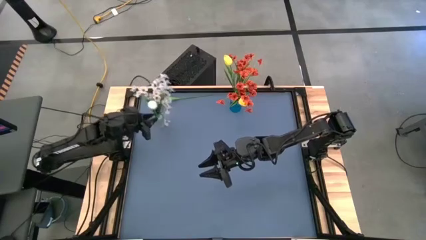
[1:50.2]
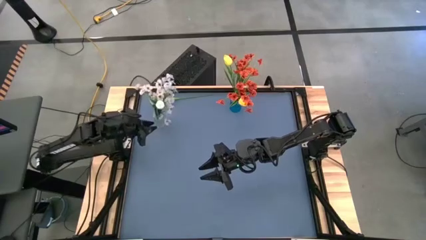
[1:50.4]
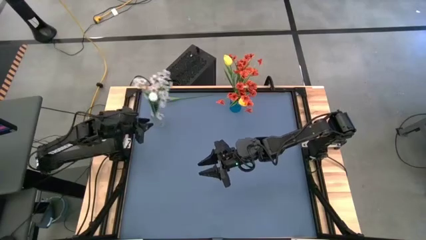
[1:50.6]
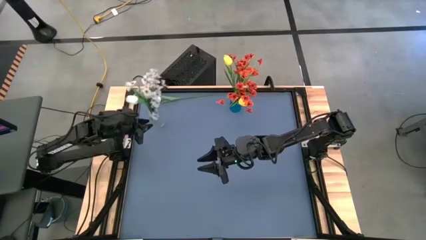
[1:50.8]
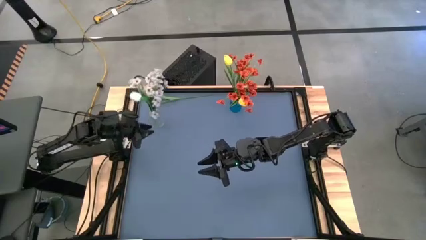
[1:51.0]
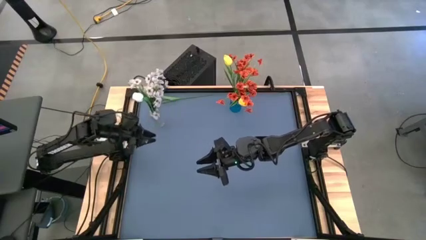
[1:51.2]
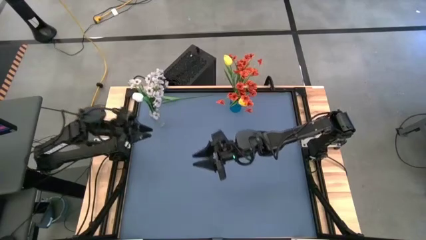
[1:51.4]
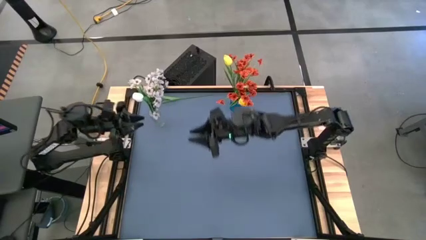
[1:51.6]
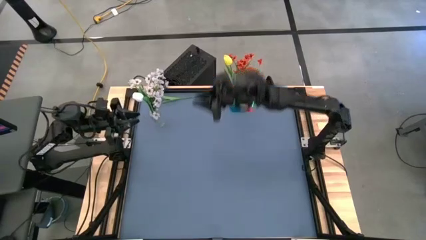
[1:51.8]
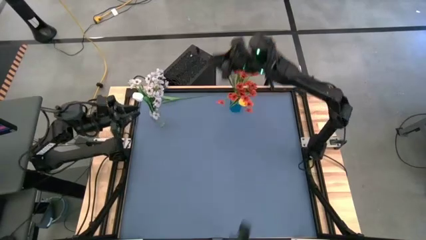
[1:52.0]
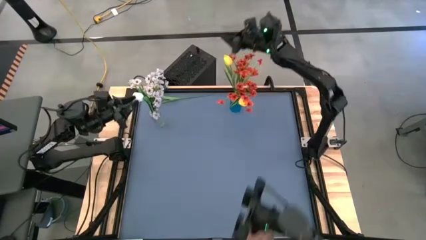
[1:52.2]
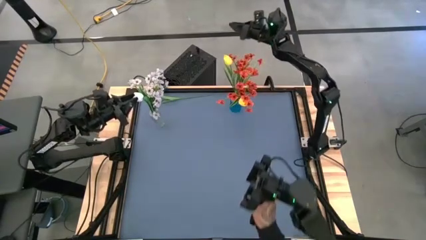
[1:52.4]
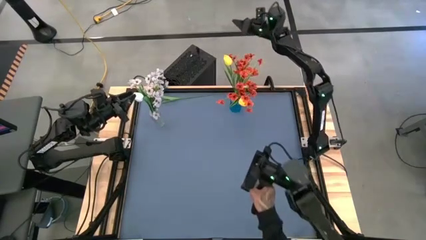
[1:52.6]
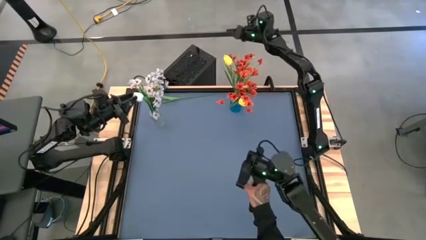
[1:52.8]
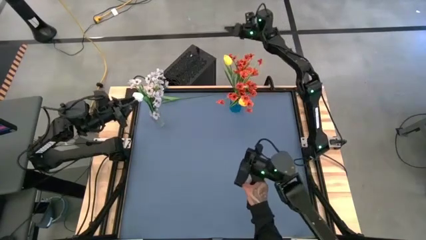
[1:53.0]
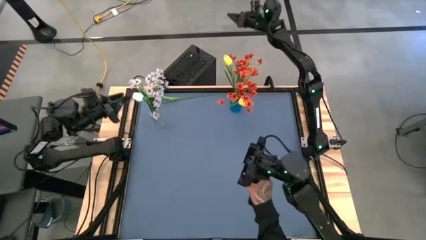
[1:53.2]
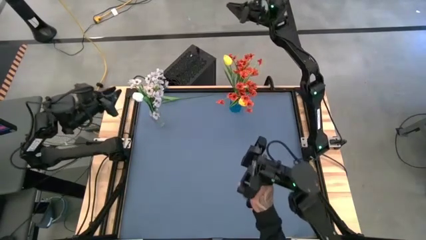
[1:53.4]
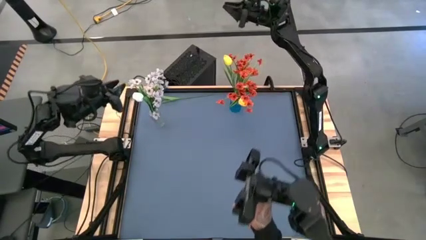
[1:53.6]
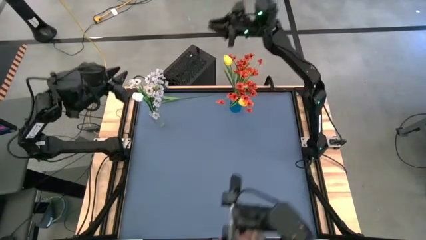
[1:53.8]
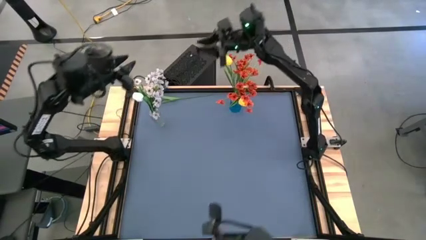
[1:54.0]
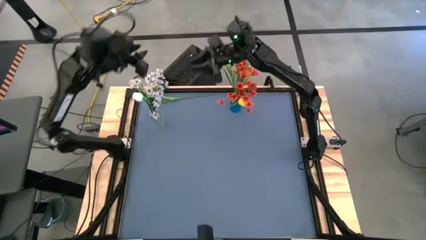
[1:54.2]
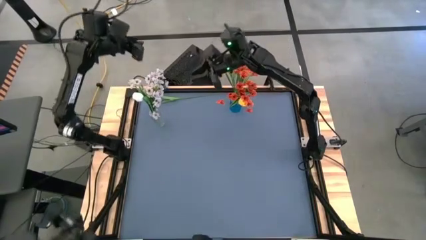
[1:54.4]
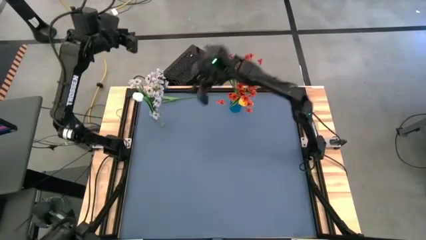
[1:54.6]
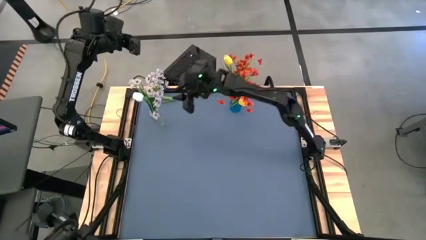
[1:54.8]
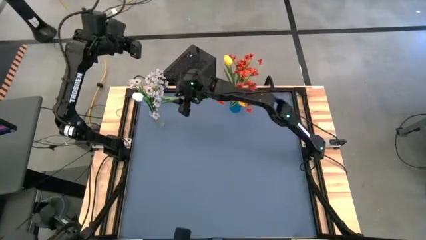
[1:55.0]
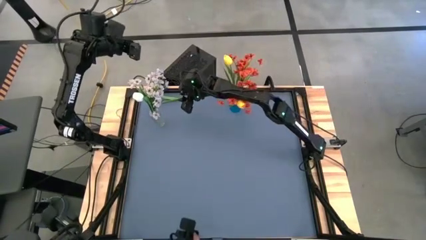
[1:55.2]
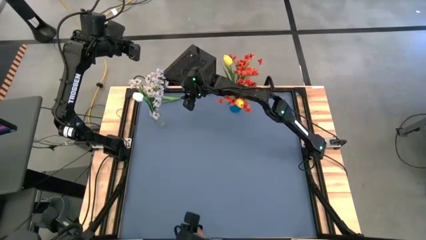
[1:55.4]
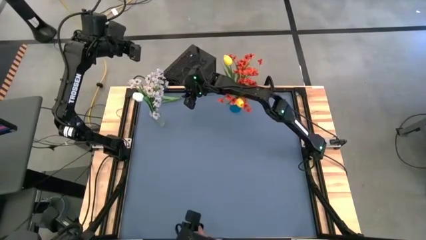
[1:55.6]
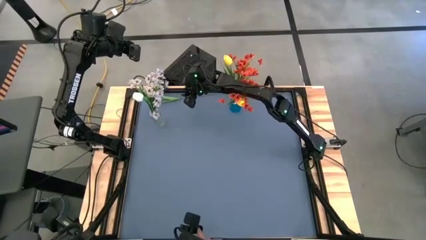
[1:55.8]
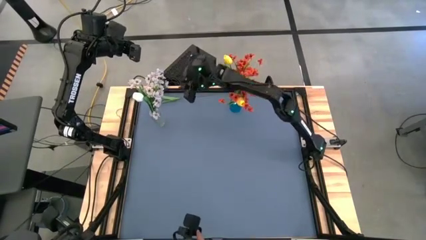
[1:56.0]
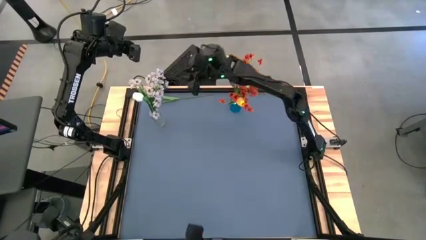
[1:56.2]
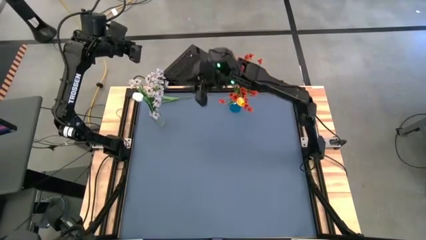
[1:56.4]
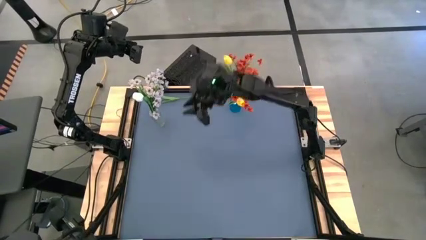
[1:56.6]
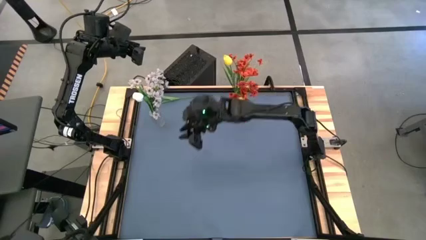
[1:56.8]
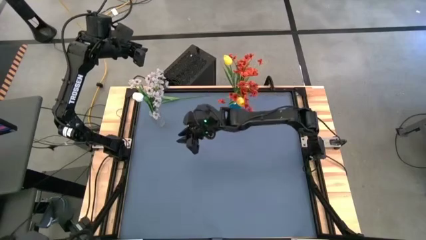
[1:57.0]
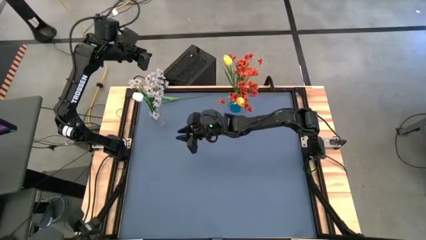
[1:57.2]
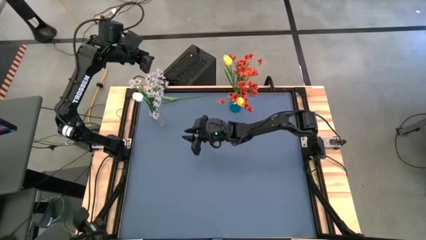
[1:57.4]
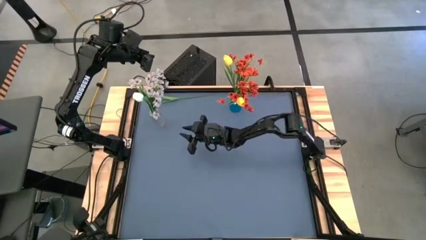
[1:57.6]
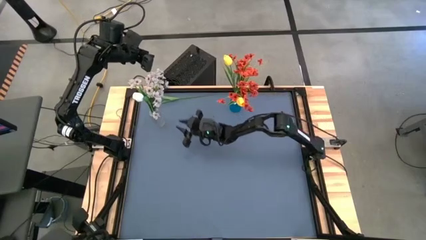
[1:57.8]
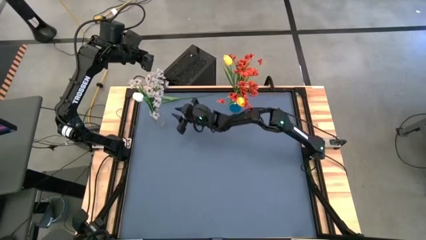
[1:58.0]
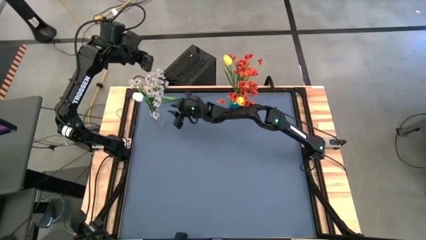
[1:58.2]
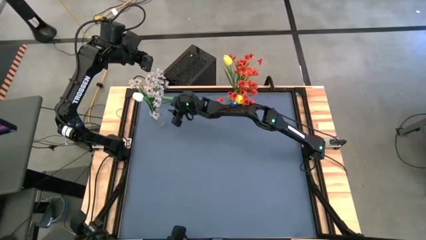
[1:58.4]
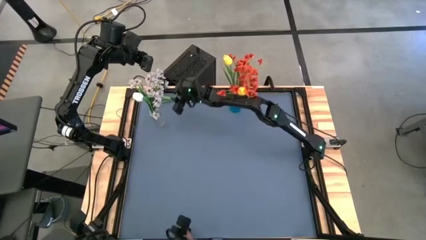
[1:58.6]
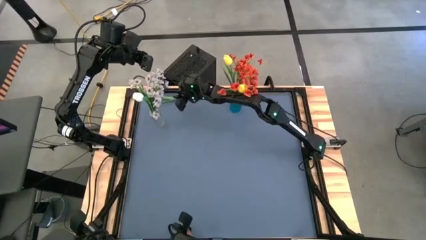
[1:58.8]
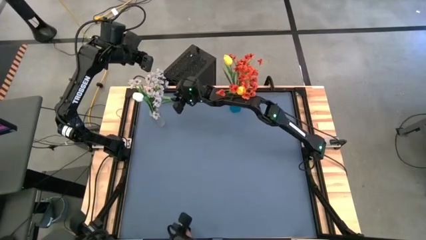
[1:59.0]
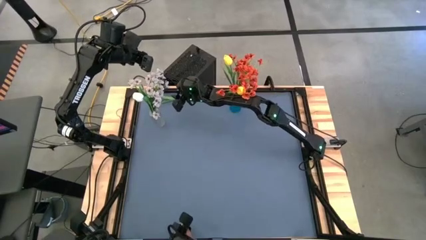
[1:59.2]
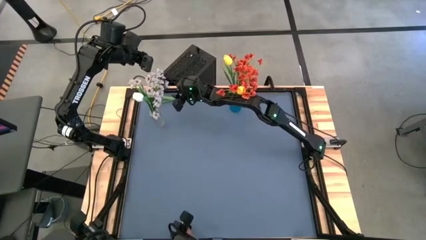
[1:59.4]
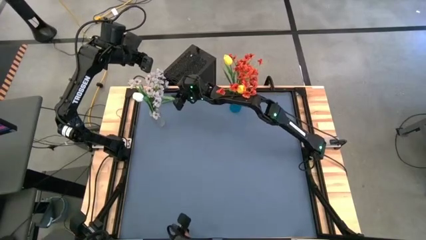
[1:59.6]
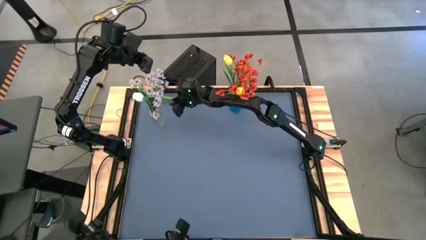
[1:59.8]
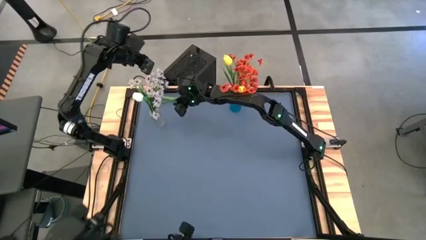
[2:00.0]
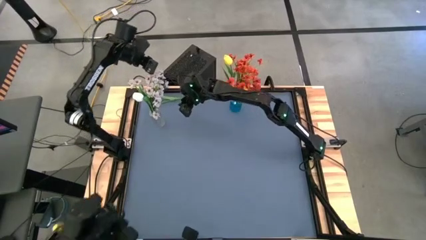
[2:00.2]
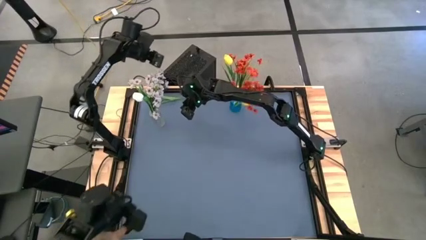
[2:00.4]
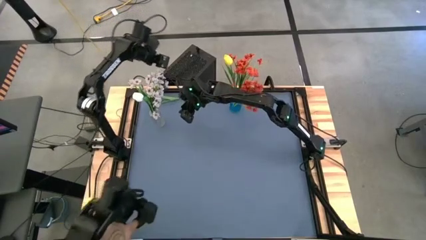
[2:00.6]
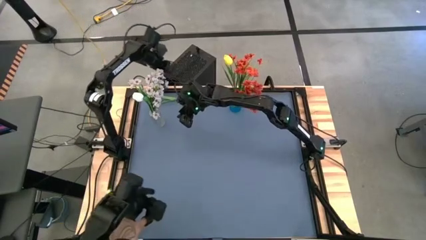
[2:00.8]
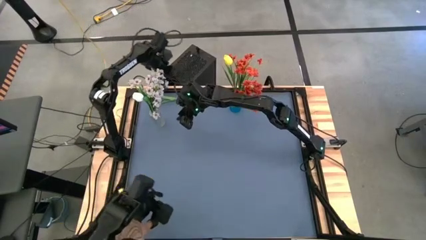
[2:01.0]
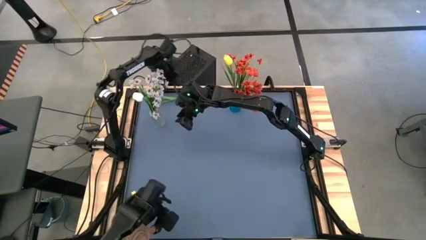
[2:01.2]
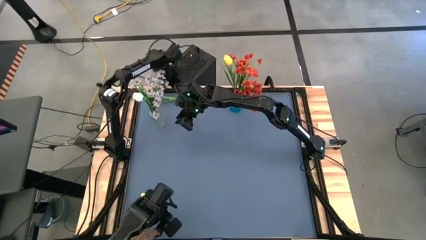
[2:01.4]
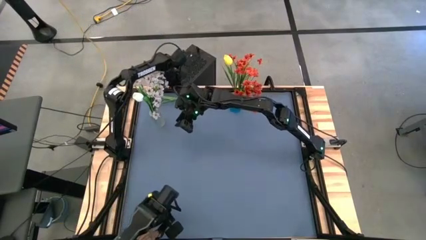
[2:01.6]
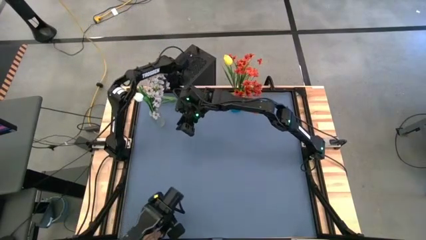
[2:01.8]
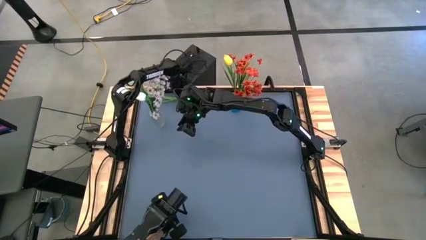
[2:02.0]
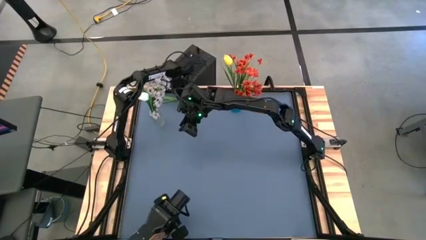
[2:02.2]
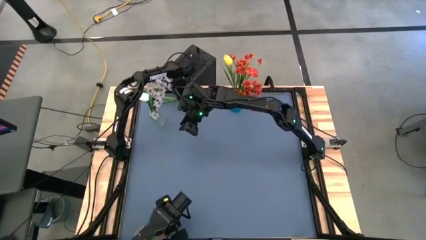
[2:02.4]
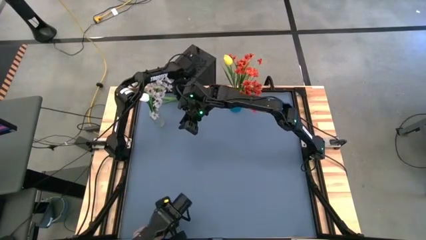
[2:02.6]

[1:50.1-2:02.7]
Task: Sort flowers into vase by color
Put the white tulip into the transparent vase

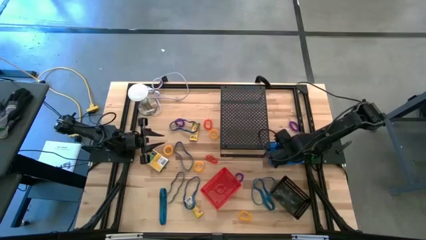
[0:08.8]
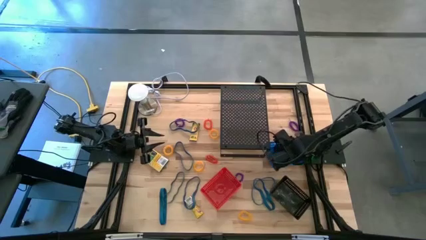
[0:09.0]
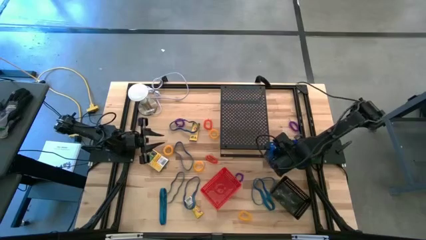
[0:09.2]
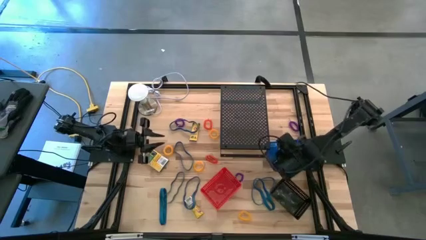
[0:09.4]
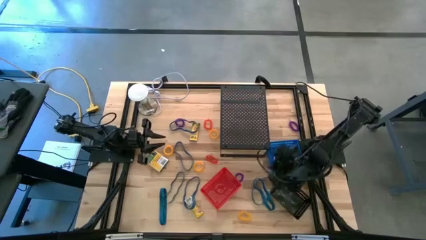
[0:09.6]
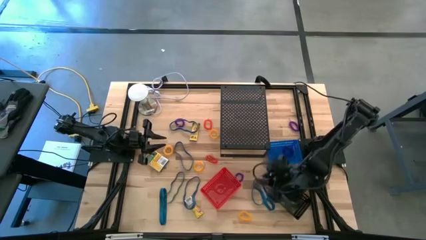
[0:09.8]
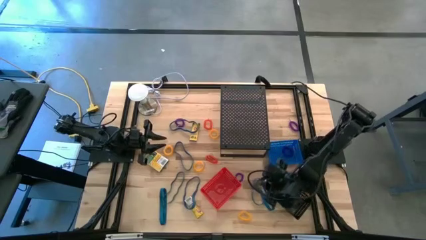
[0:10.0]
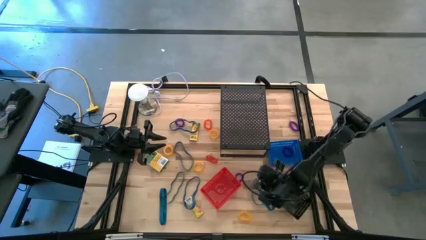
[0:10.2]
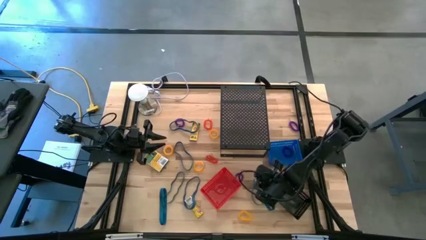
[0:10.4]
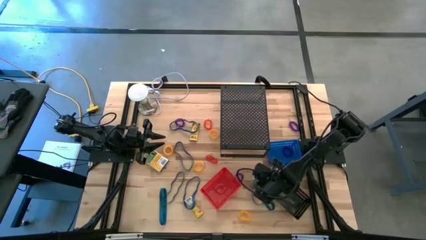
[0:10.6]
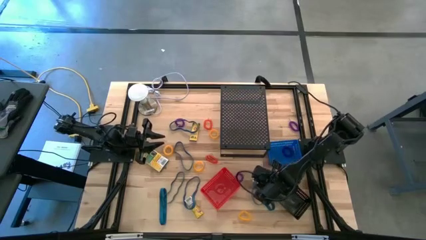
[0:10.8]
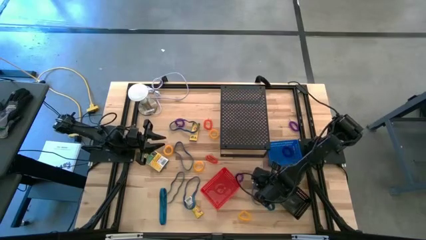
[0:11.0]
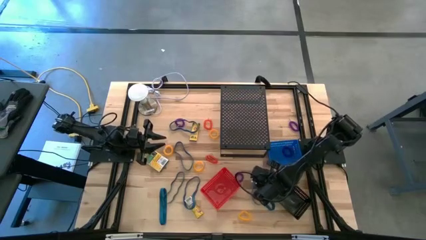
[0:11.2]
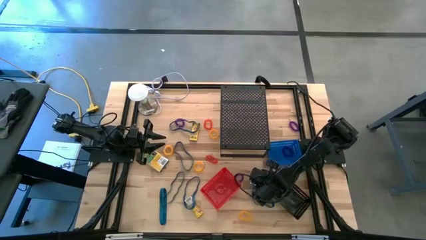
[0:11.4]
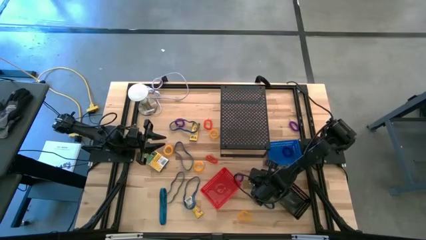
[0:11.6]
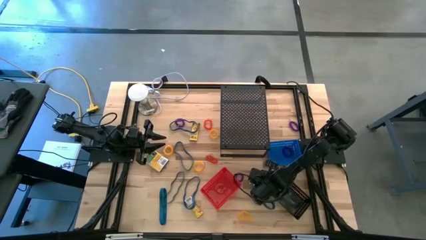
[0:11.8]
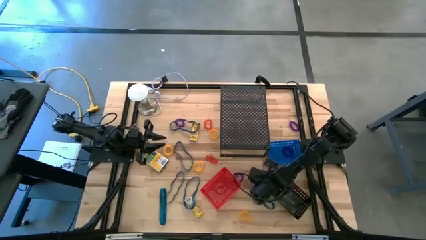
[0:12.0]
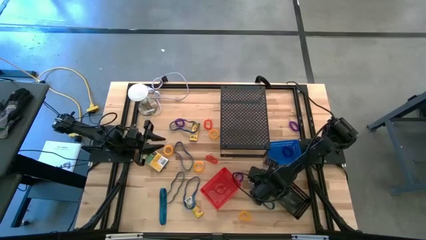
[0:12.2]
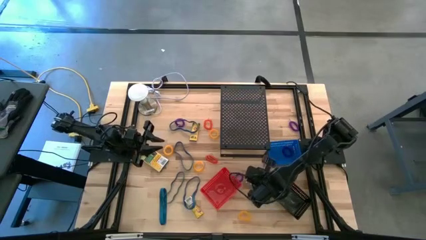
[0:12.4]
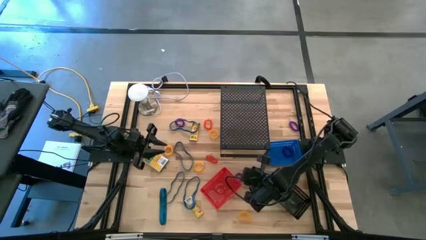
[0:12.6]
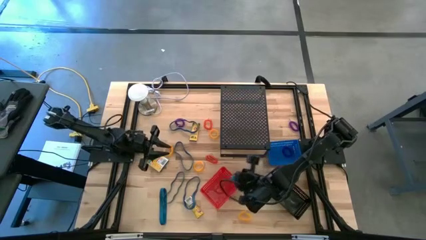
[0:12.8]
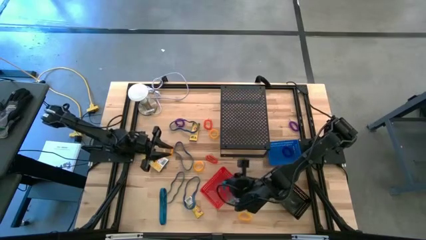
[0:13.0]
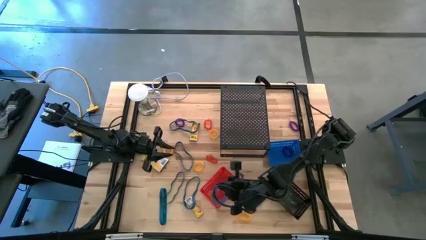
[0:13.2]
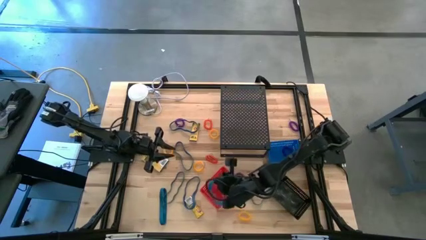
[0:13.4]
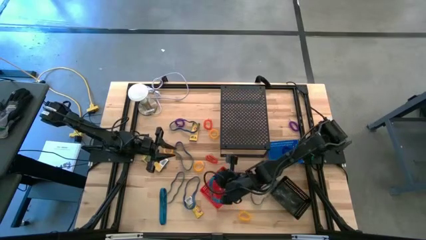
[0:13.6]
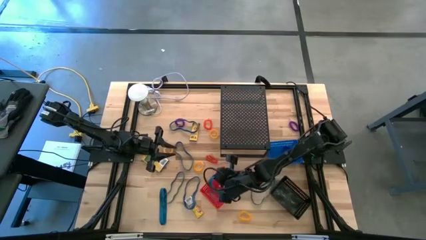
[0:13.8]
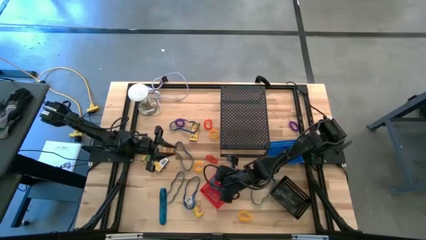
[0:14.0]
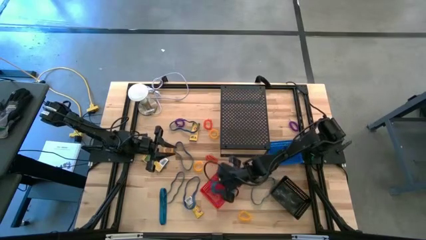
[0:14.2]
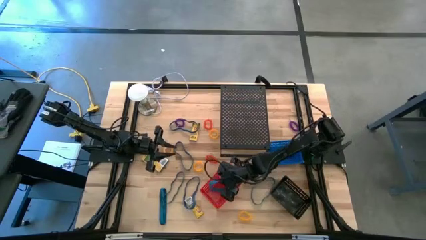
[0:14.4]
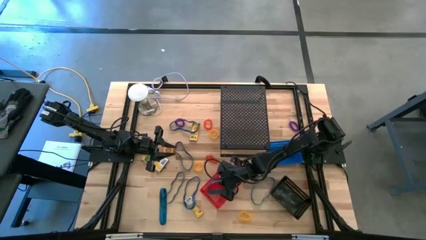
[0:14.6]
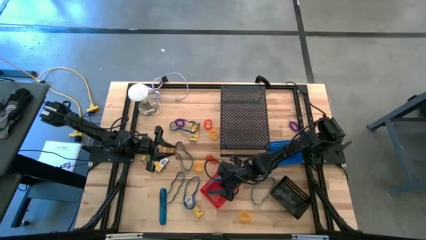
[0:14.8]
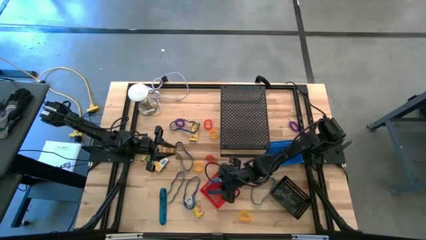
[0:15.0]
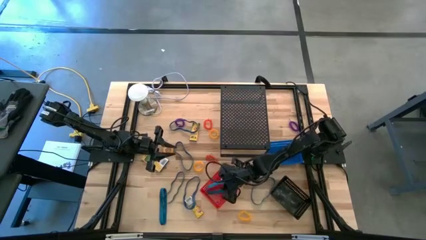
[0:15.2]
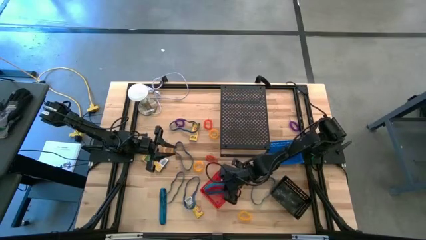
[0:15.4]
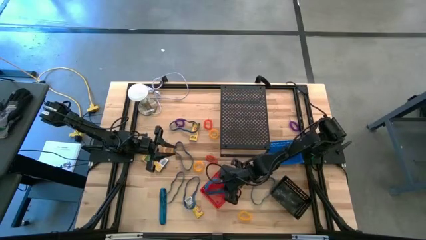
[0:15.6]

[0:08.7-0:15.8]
Task: Pick & Place Office Desk Supplies
Put the blue rubberband into the red basket
